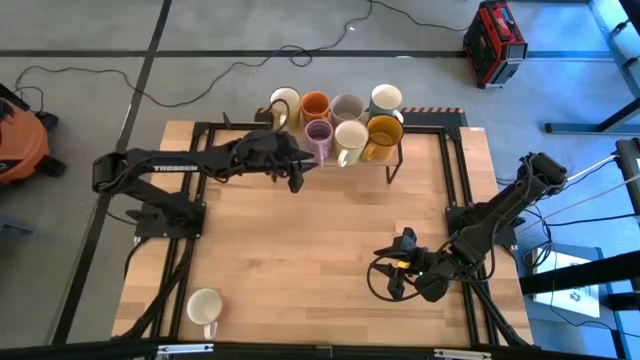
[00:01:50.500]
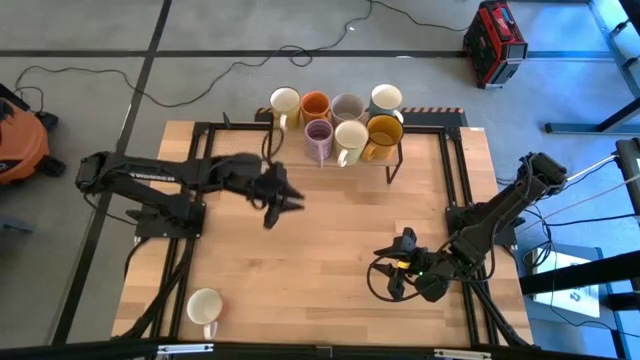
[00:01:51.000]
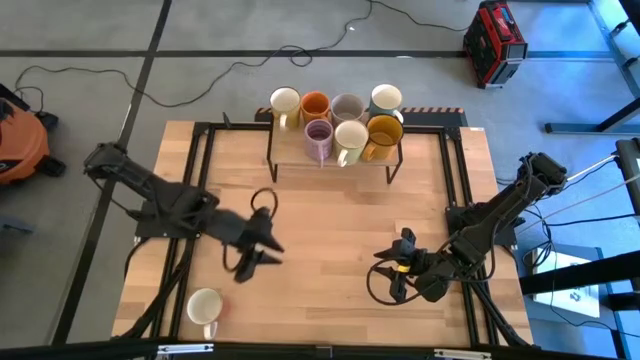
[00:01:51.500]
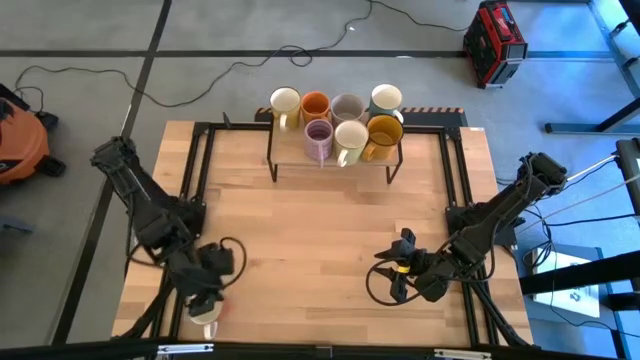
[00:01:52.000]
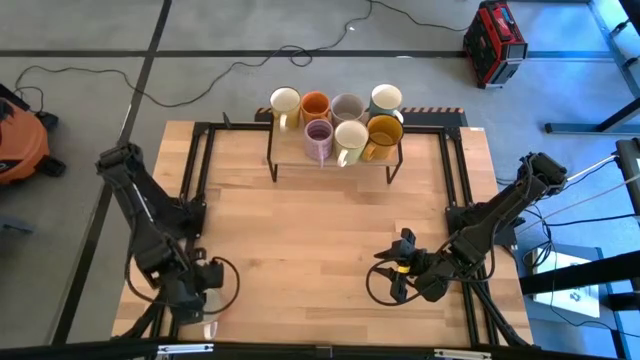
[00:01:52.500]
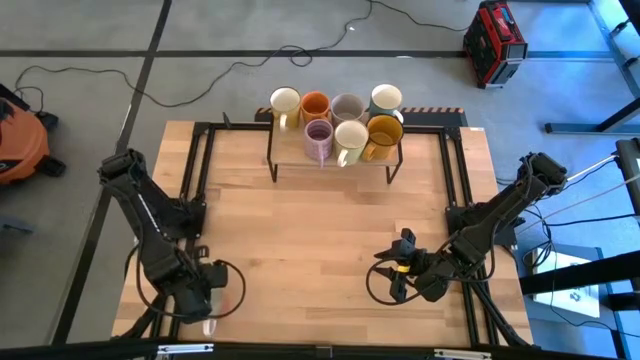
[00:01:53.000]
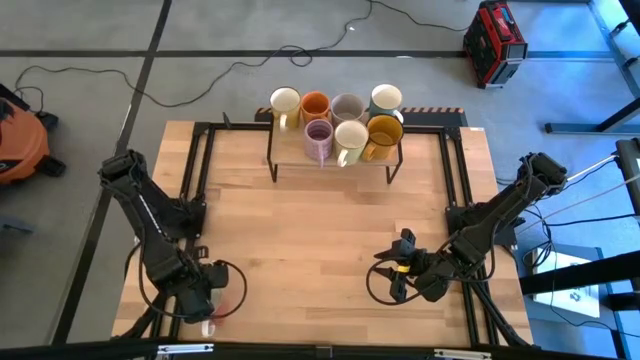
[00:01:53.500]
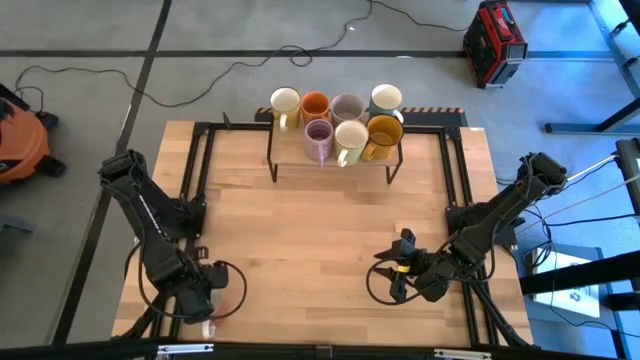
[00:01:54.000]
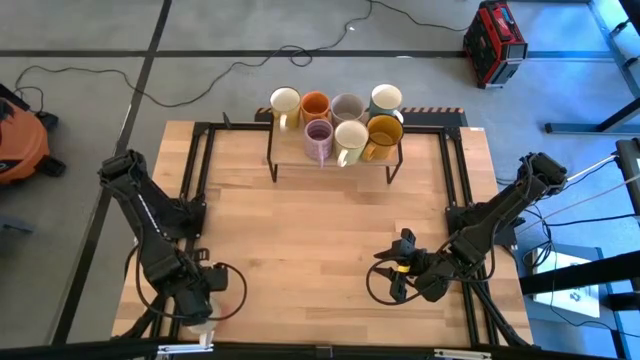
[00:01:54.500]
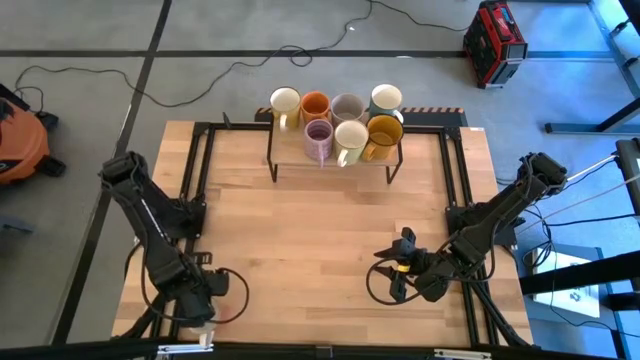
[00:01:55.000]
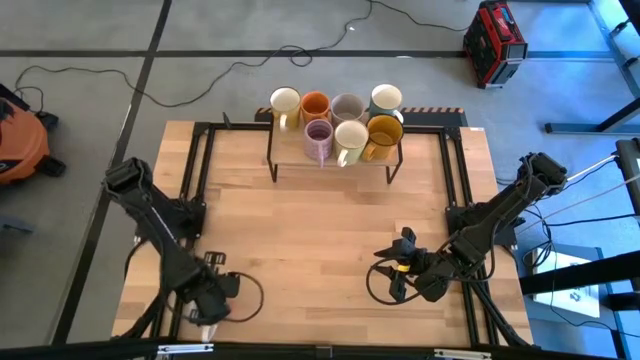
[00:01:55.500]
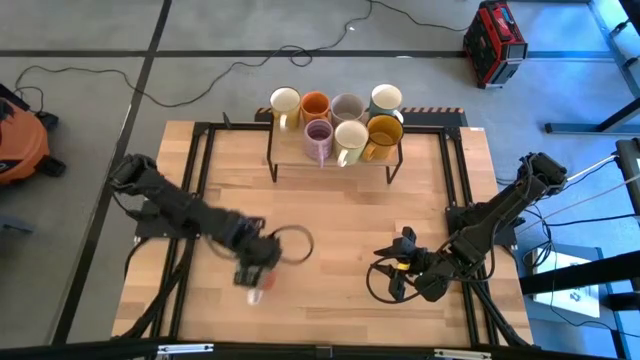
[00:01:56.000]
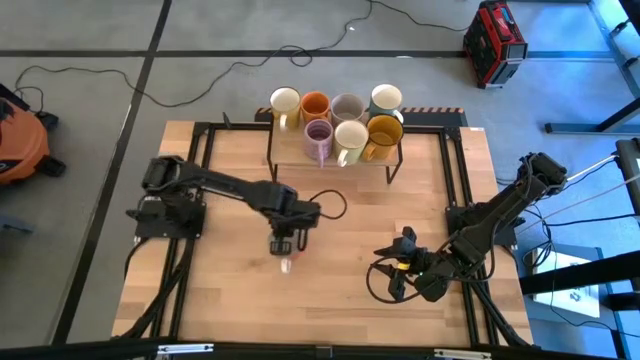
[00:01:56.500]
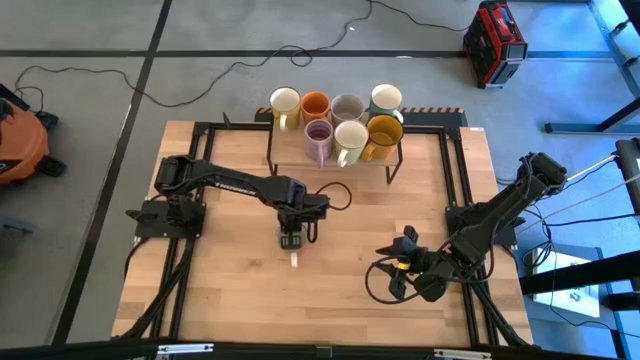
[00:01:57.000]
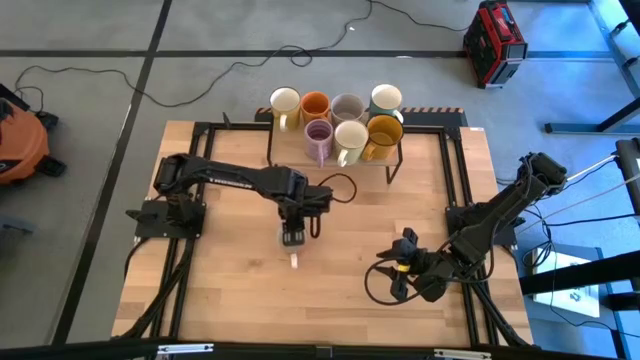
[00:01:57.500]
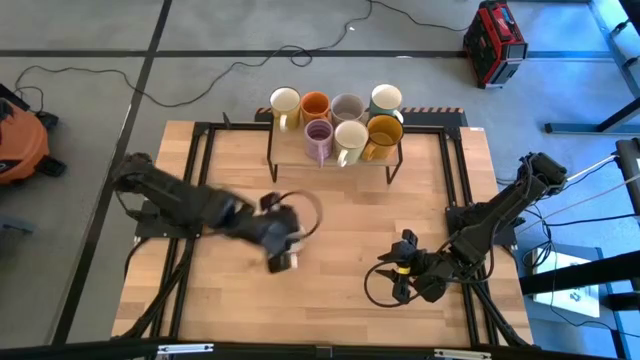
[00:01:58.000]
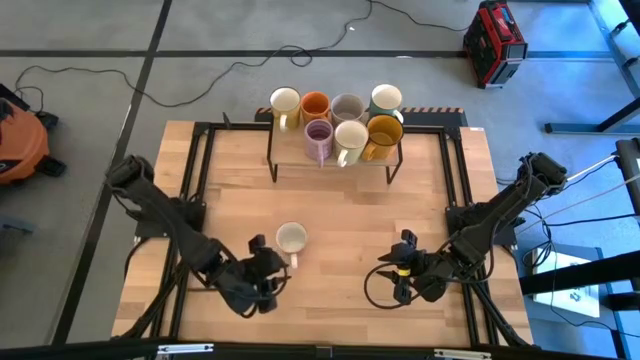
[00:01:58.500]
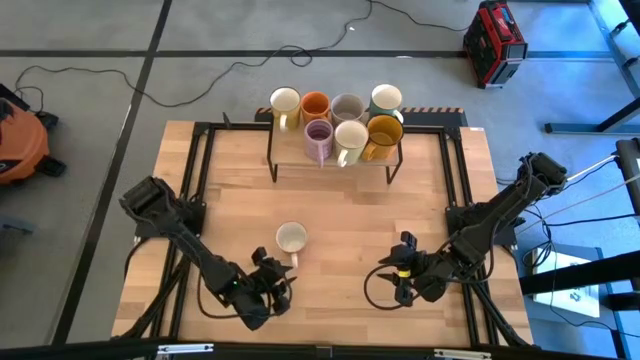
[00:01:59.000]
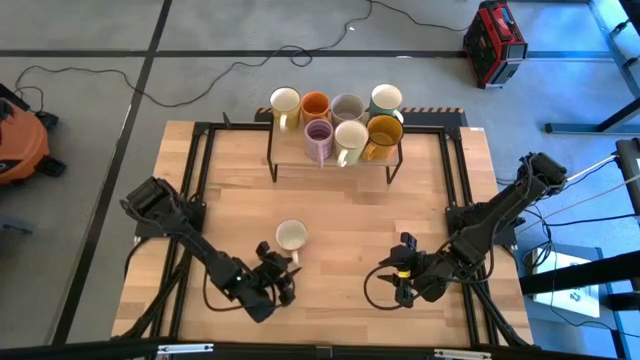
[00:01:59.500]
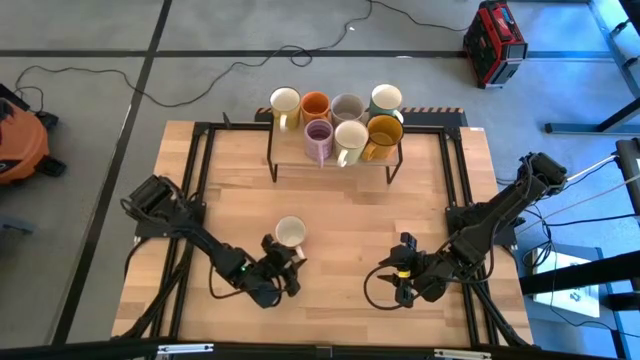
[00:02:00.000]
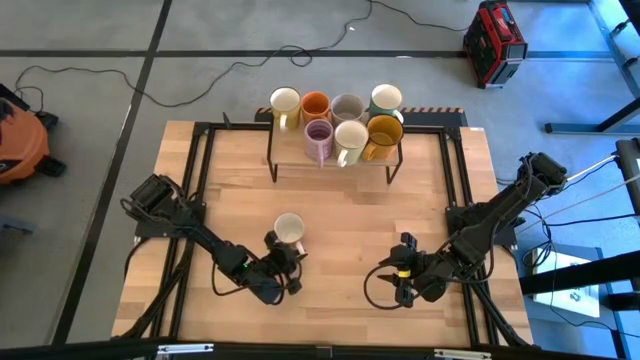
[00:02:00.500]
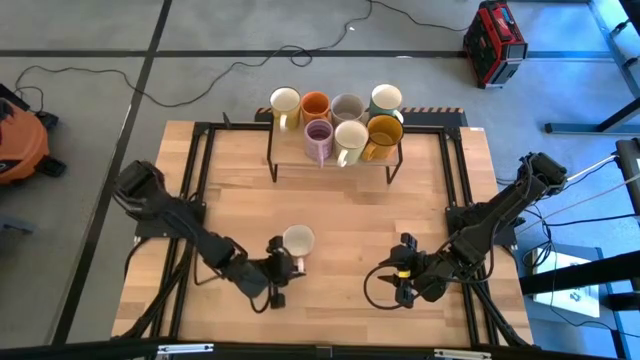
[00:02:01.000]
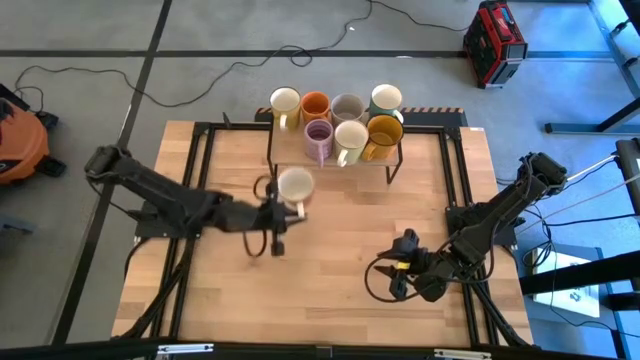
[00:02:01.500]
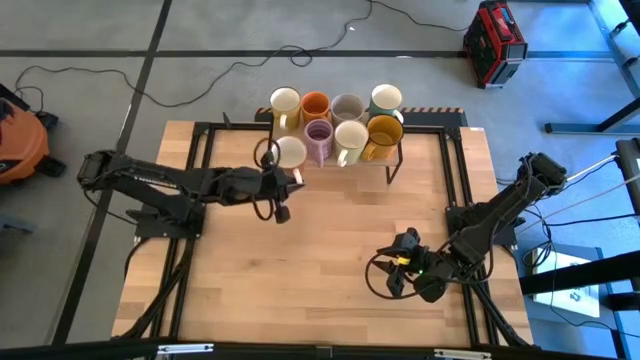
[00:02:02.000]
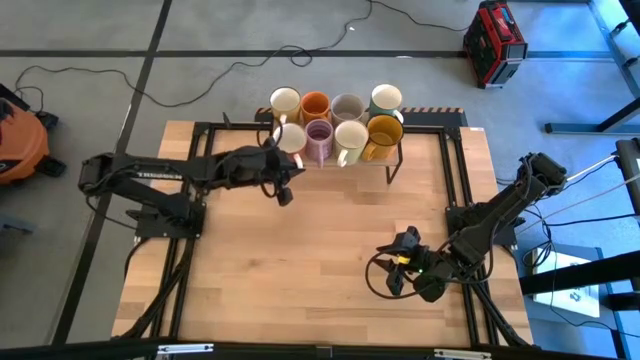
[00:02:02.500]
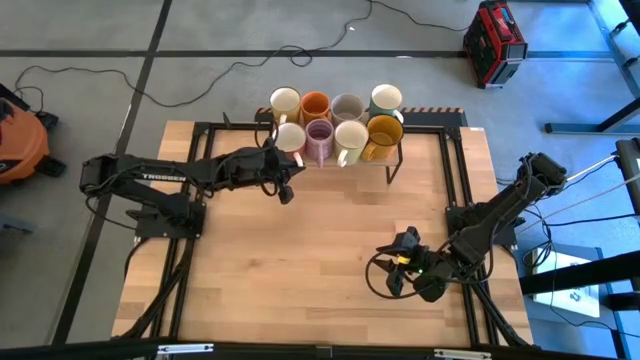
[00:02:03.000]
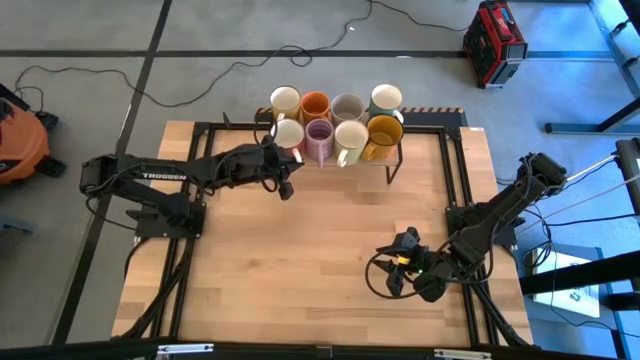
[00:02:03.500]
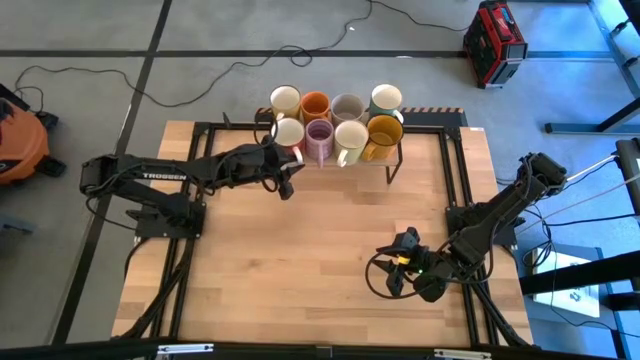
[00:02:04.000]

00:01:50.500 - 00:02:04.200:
Task: Place coffee mugs
Put the red mug on the shelf

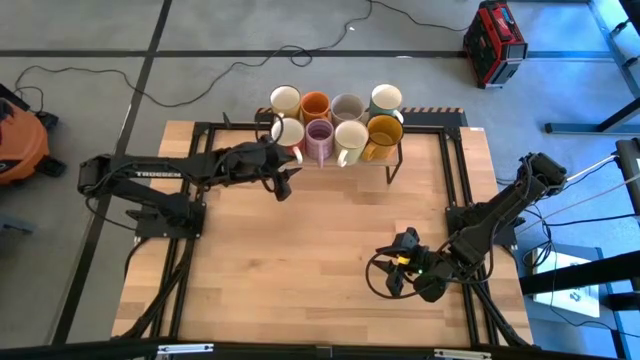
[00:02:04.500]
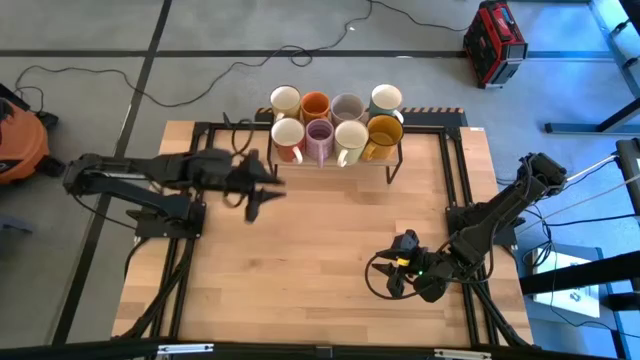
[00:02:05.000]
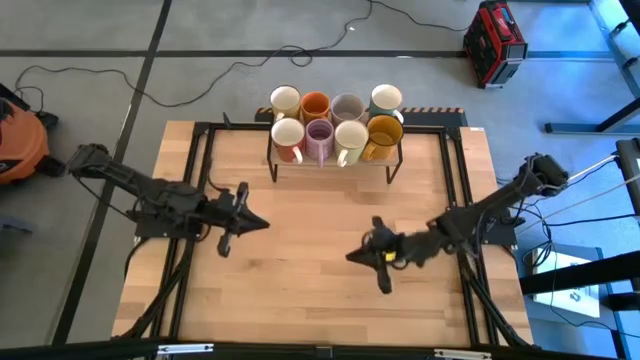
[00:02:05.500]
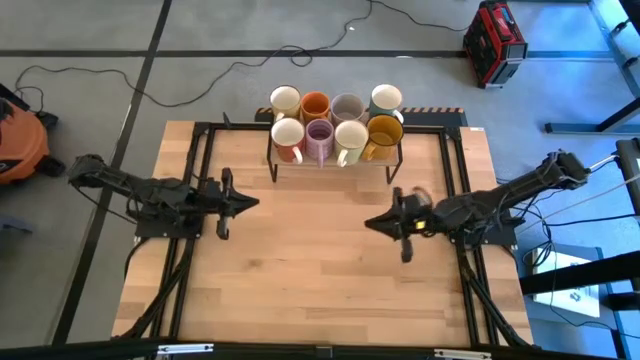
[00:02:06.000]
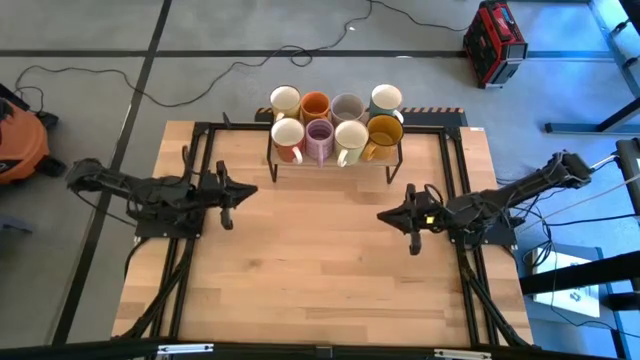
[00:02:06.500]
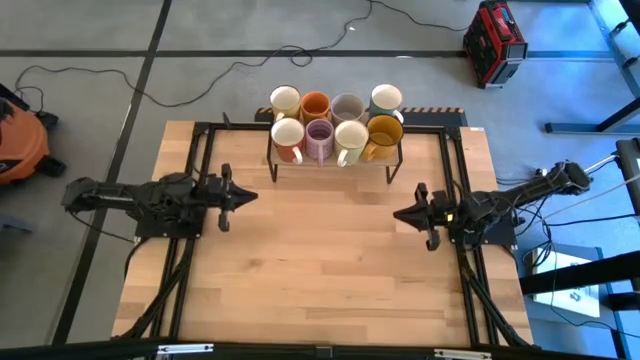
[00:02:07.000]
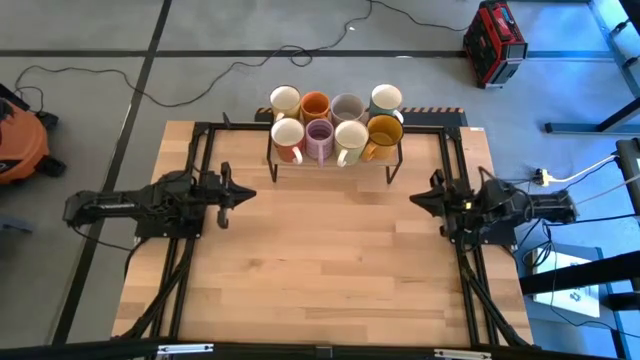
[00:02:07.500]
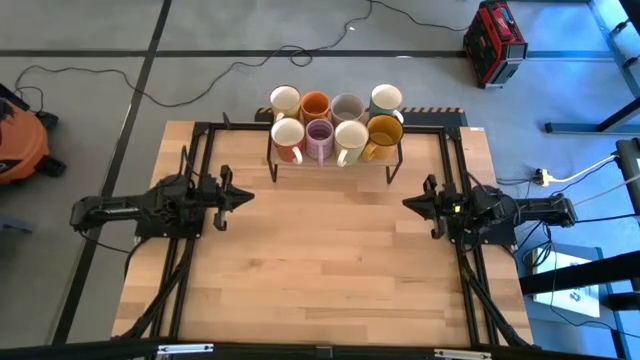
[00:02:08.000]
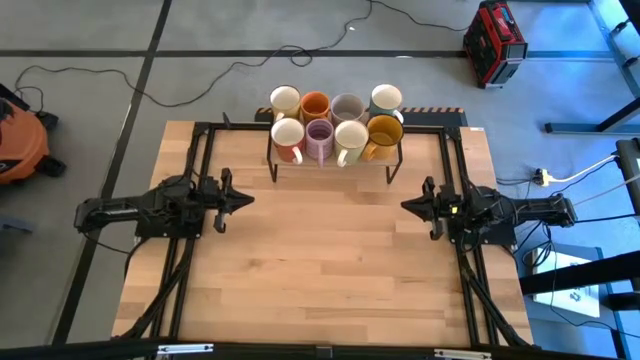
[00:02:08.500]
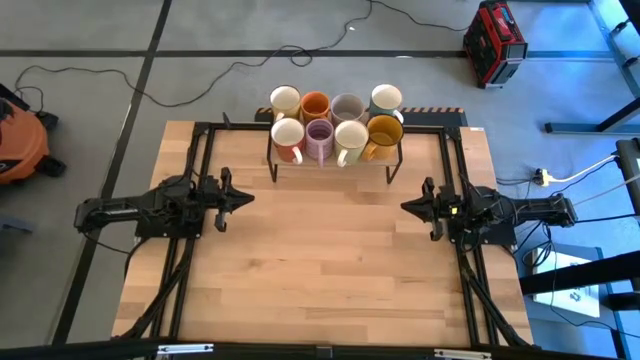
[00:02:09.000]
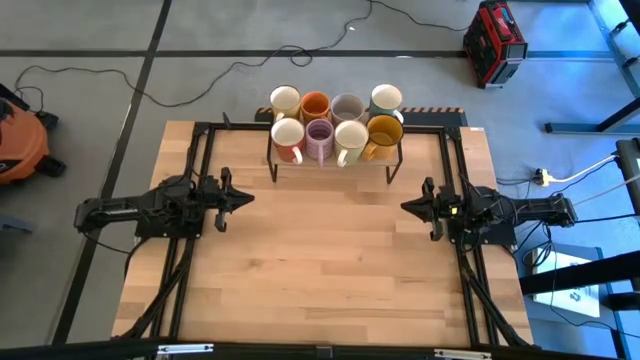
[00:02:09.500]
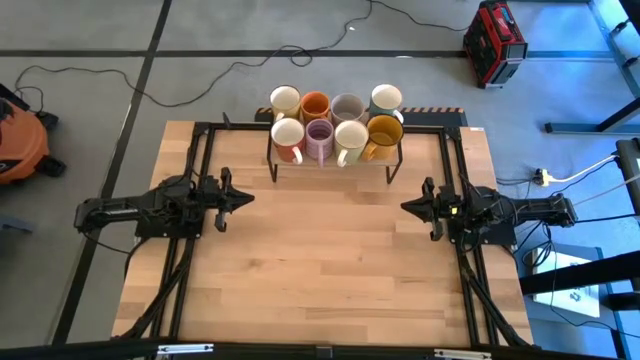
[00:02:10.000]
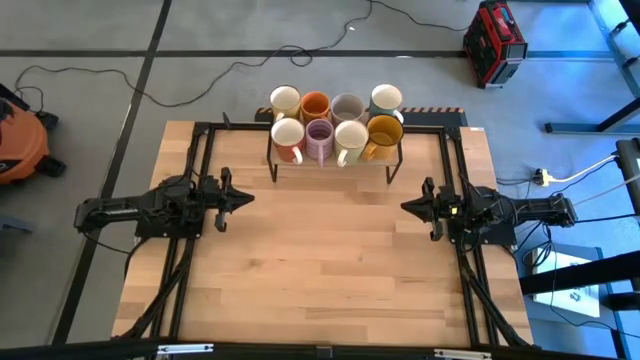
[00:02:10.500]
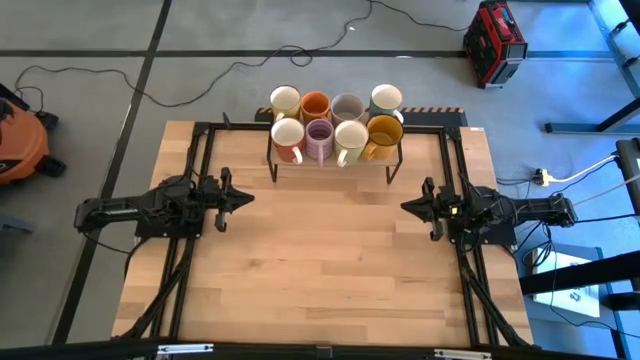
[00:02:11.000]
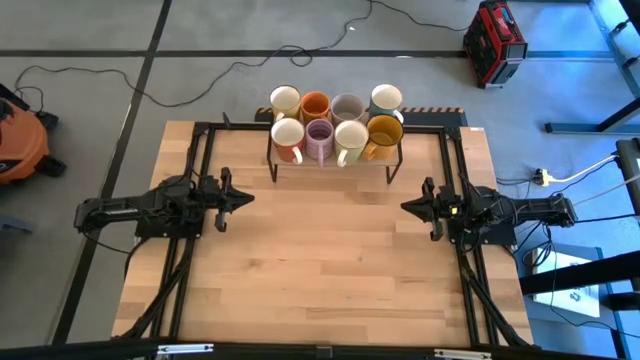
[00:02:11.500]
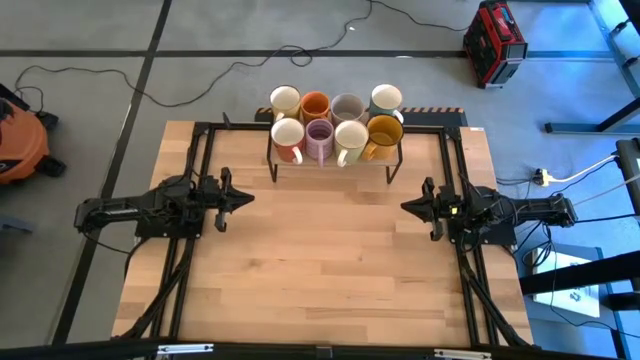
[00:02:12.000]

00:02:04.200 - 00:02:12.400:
Return to Home Position
